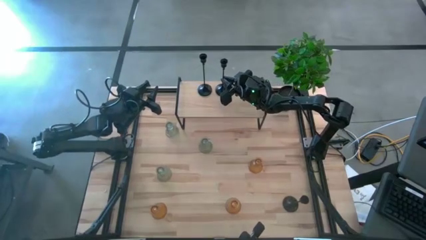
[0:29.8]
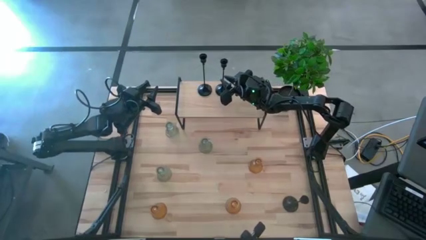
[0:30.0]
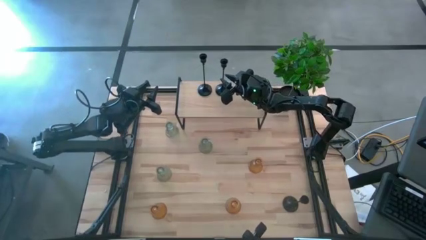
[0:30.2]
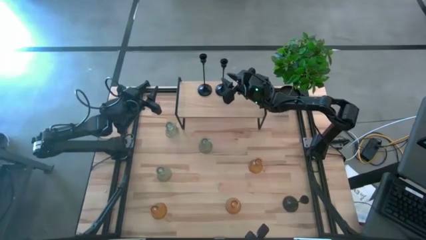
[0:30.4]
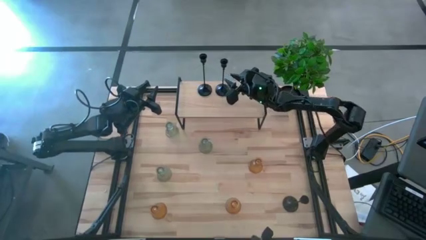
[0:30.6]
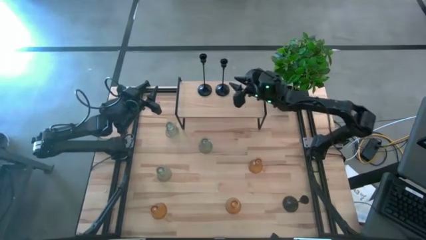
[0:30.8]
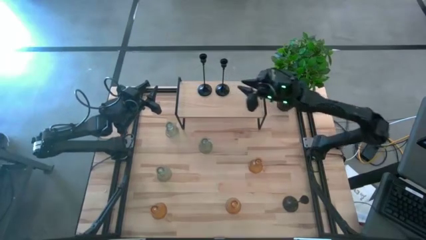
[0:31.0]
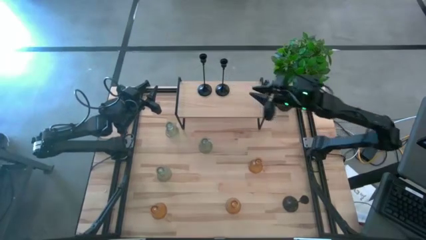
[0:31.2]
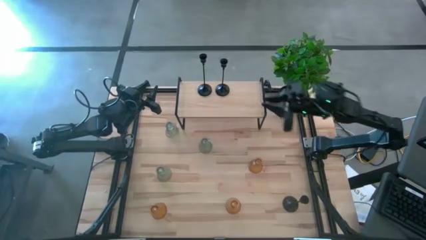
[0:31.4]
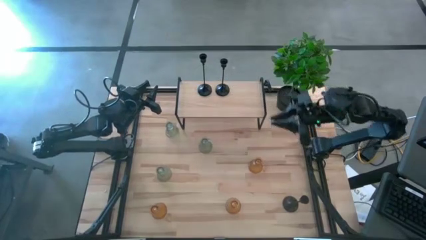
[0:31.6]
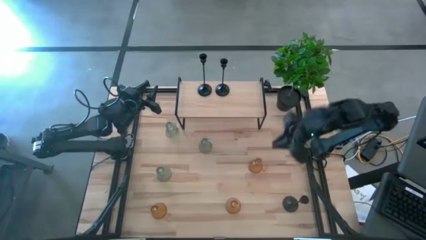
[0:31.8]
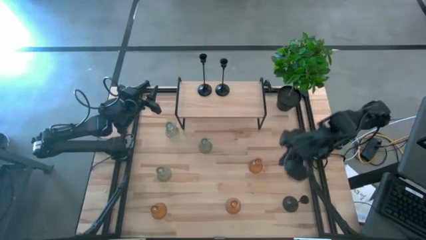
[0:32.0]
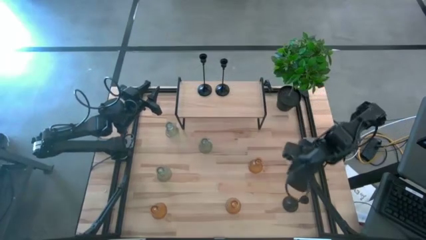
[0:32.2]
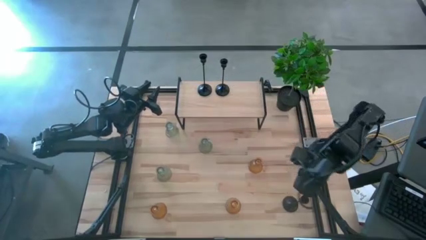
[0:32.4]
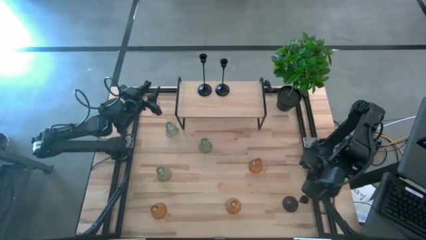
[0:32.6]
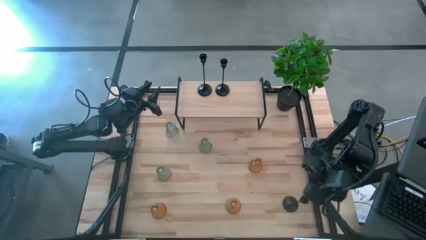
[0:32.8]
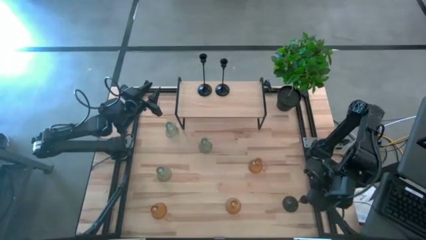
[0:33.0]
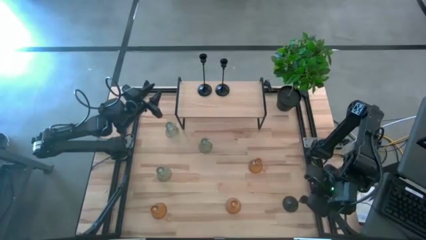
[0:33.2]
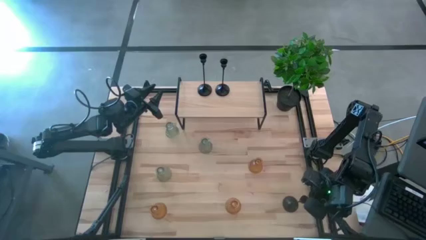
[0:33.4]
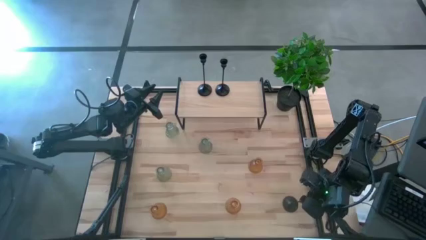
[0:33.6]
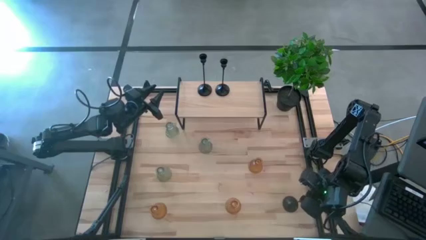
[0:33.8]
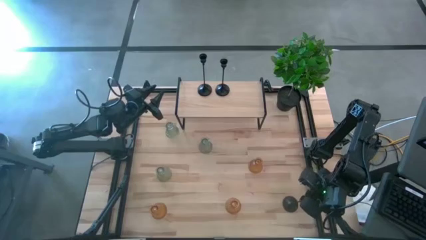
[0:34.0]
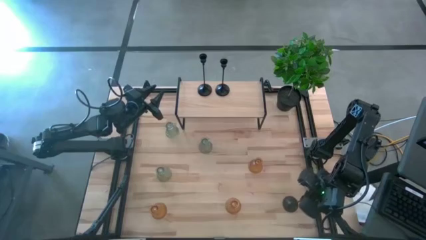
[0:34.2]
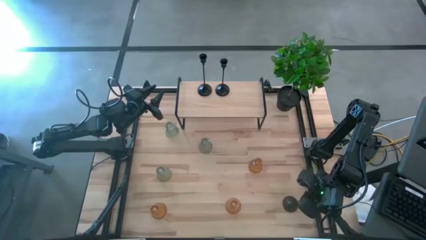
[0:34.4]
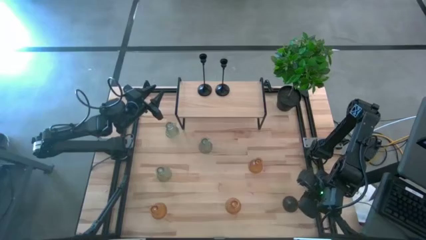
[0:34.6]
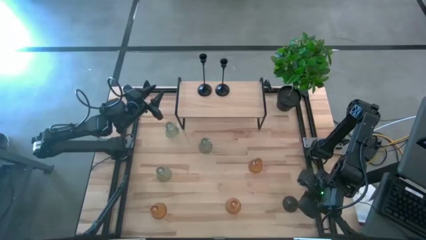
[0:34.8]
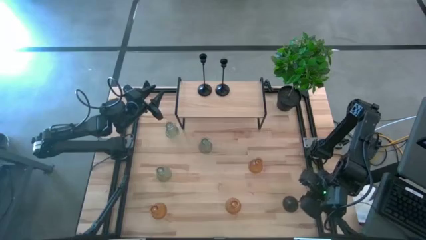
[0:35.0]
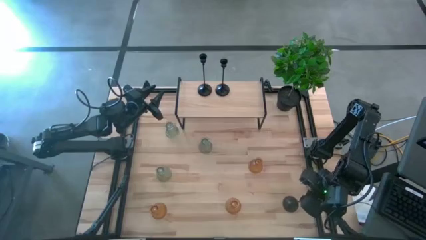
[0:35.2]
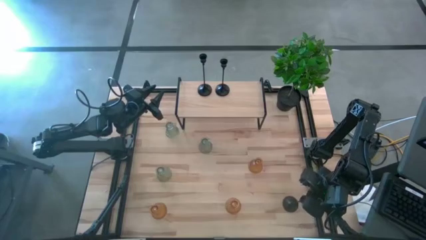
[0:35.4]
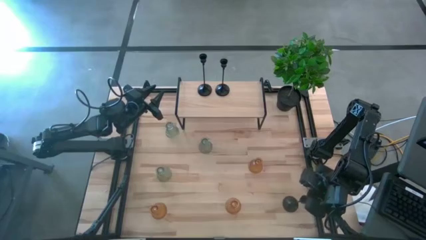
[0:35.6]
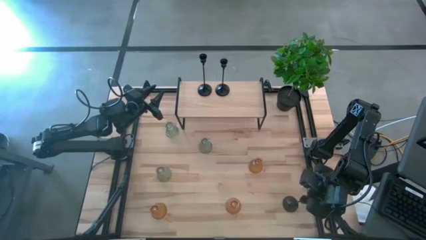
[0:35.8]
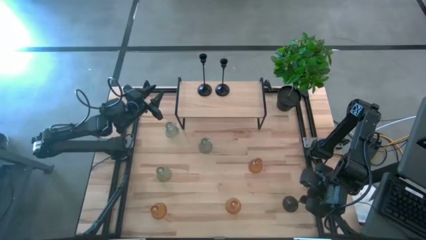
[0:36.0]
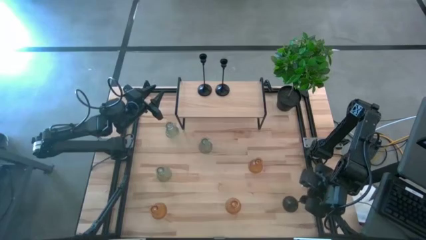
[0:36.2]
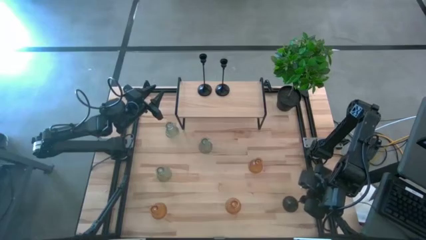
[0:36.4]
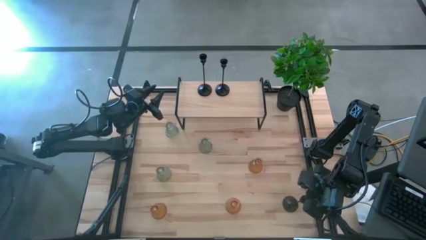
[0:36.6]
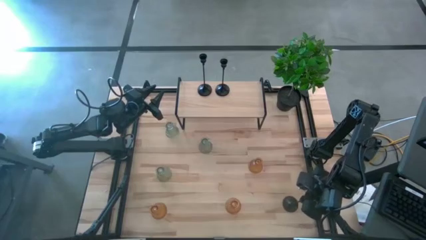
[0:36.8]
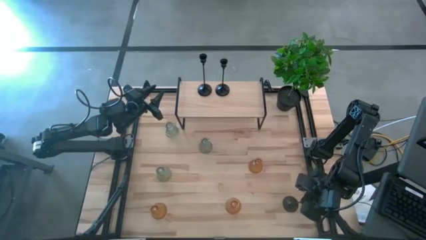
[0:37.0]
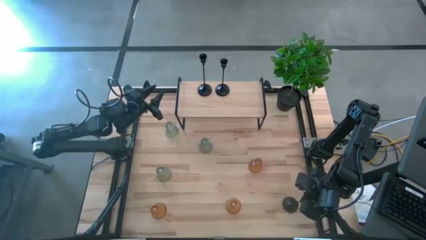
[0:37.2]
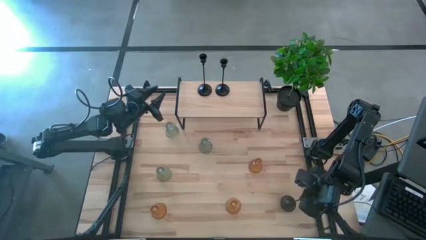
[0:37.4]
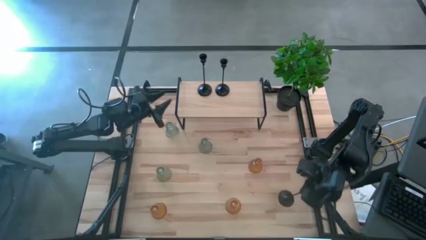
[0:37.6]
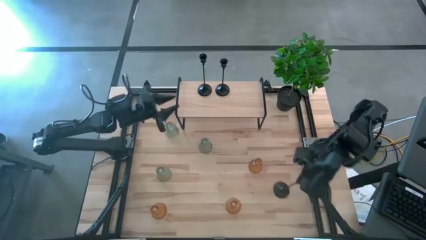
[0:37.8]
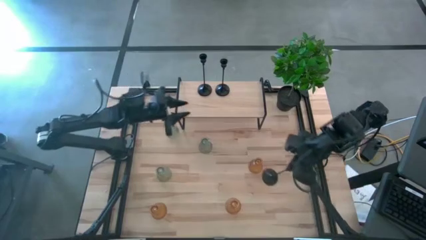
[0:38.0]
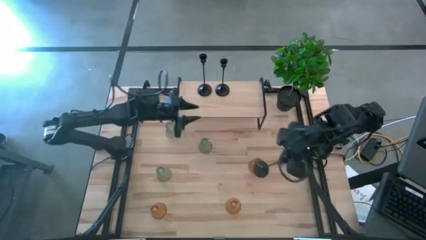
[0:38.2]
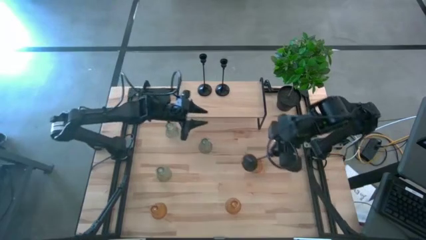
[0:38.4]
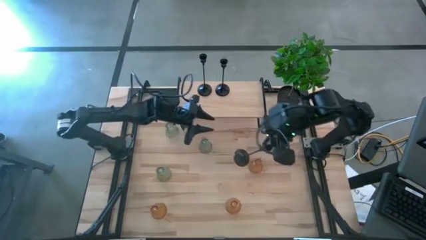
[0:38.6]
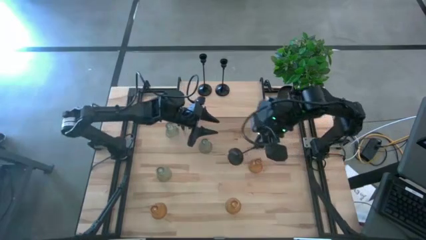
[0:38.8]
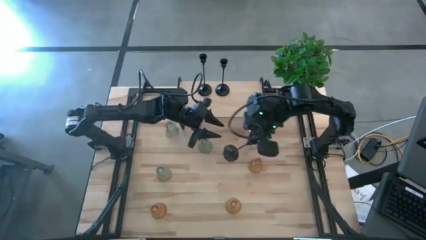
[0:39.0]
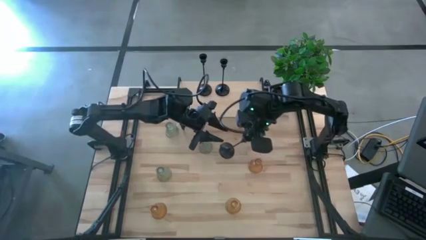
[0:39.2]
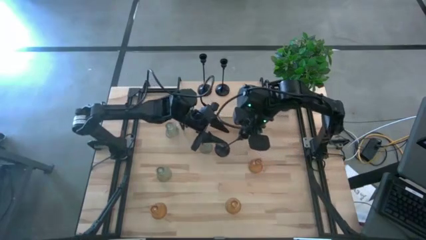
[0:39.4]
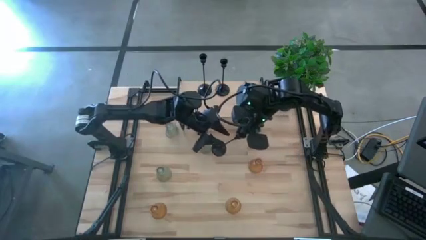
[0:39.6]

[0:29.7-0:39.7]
Task: Pick & Place candle stick holders
Put the black candle holder on the shelf

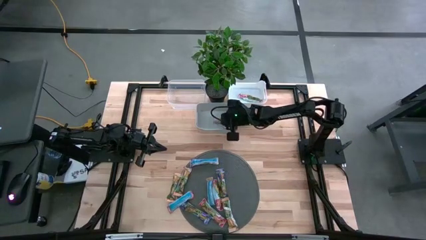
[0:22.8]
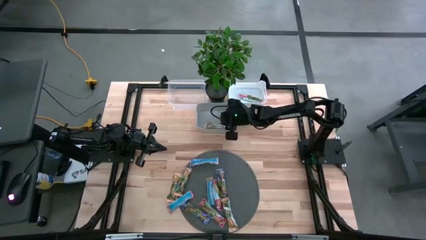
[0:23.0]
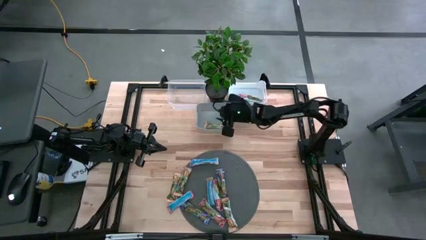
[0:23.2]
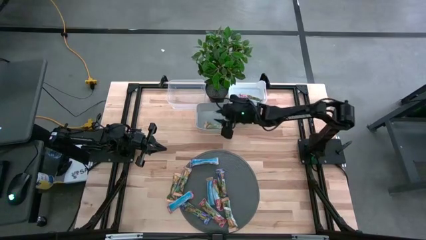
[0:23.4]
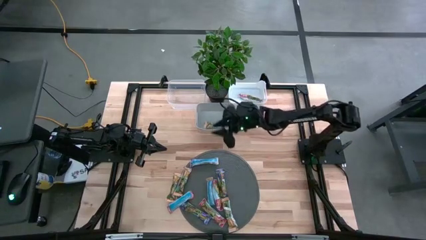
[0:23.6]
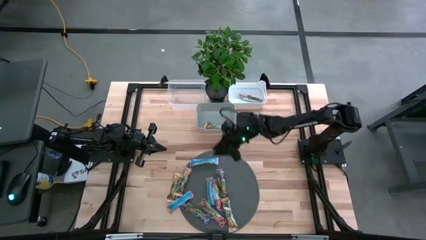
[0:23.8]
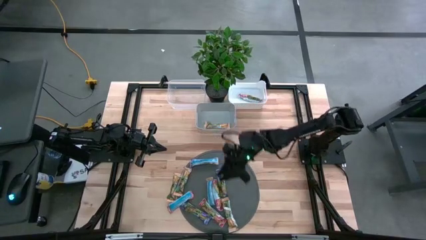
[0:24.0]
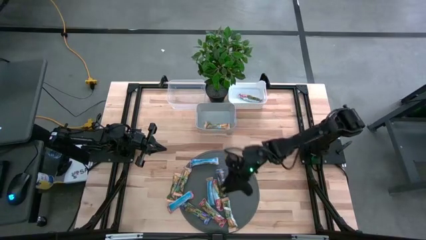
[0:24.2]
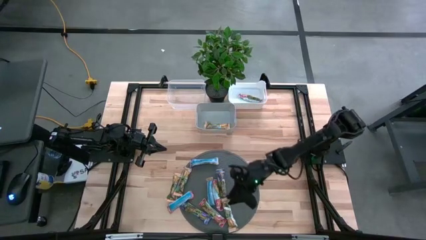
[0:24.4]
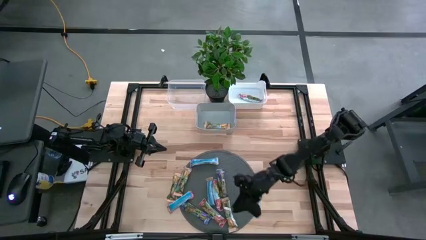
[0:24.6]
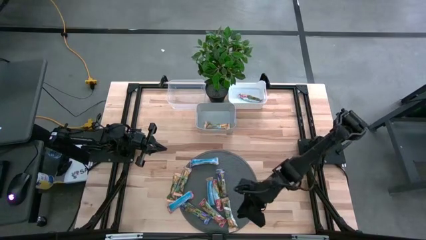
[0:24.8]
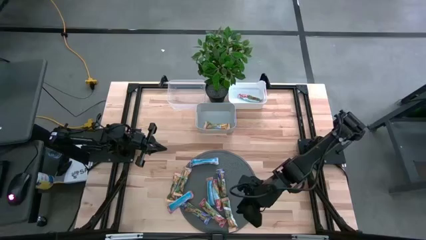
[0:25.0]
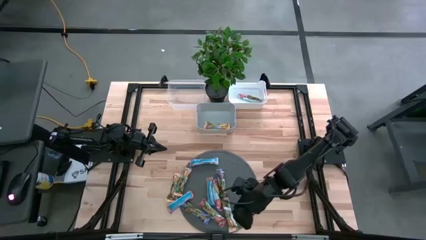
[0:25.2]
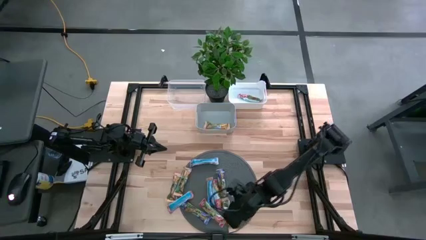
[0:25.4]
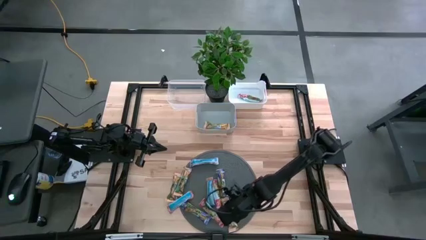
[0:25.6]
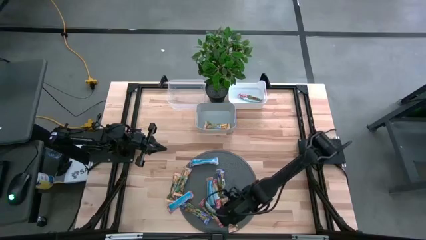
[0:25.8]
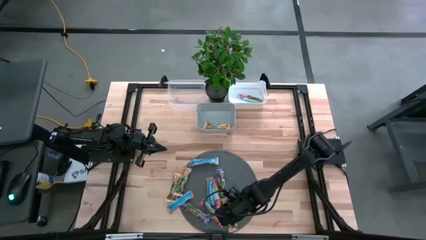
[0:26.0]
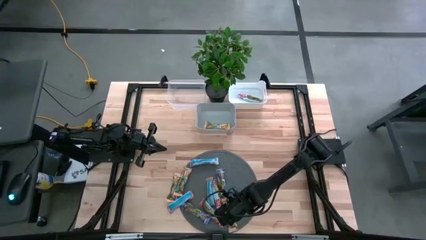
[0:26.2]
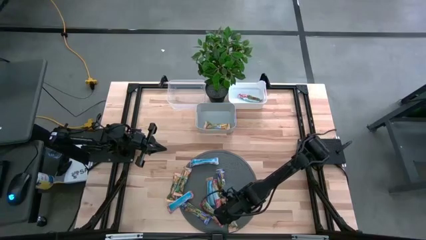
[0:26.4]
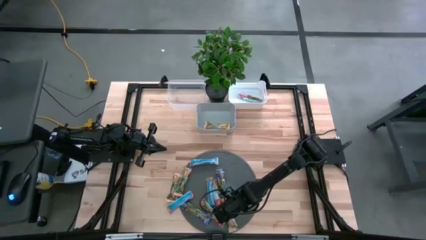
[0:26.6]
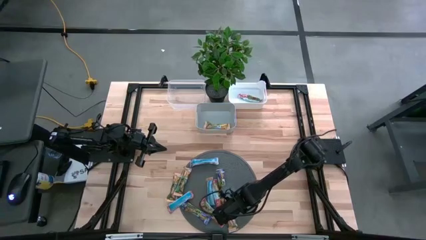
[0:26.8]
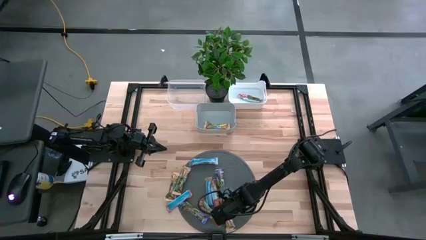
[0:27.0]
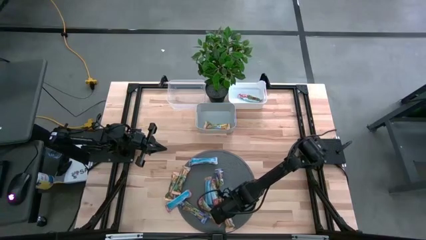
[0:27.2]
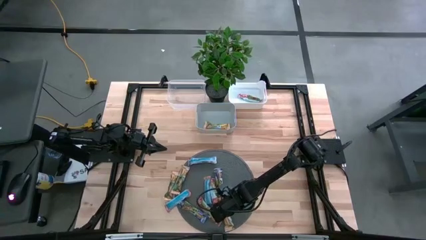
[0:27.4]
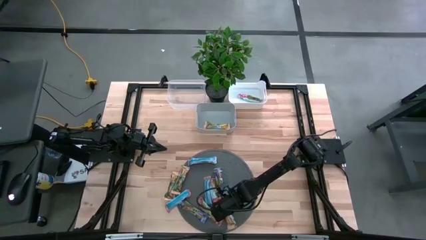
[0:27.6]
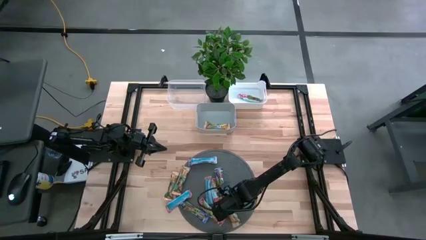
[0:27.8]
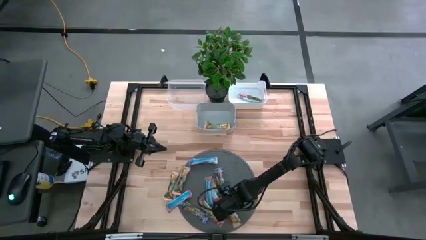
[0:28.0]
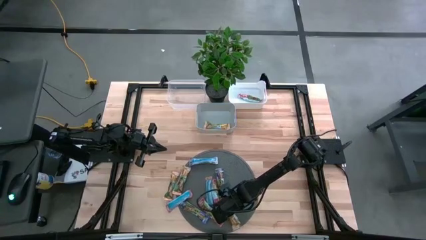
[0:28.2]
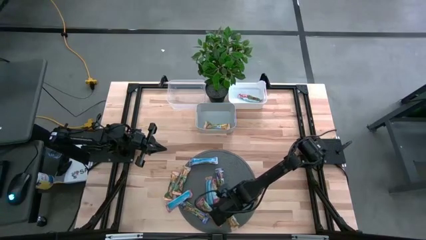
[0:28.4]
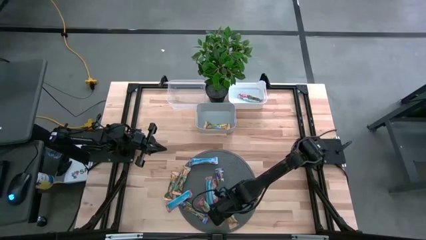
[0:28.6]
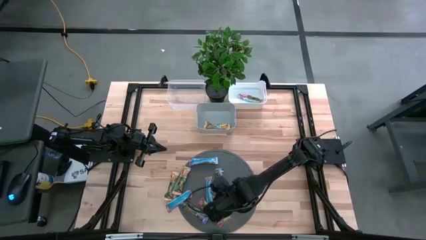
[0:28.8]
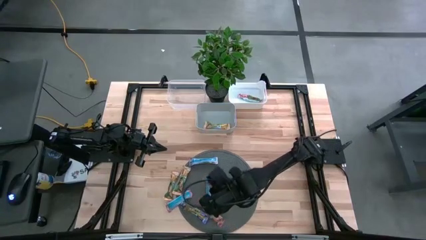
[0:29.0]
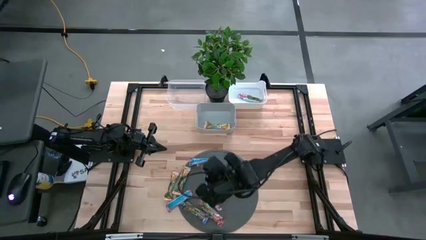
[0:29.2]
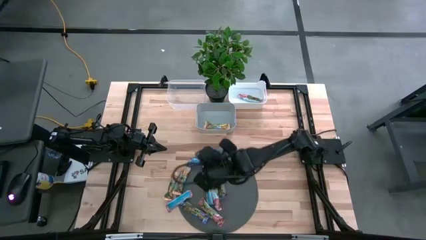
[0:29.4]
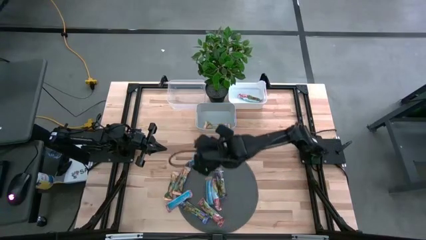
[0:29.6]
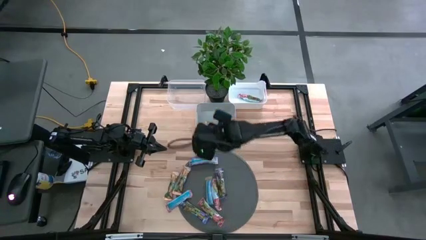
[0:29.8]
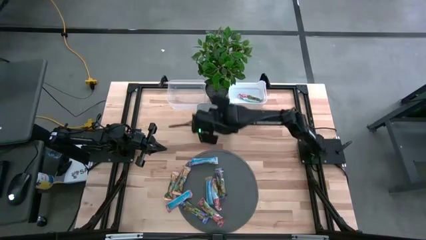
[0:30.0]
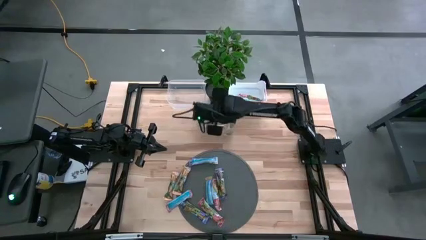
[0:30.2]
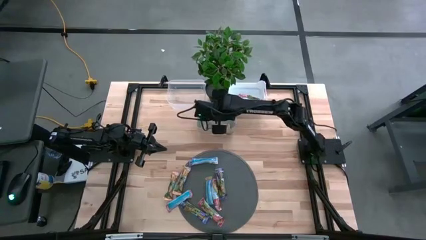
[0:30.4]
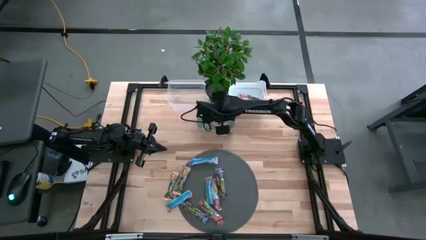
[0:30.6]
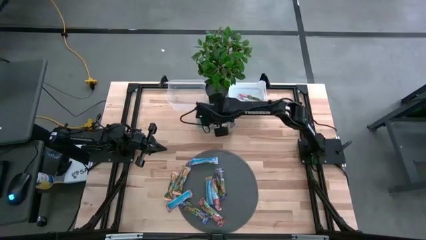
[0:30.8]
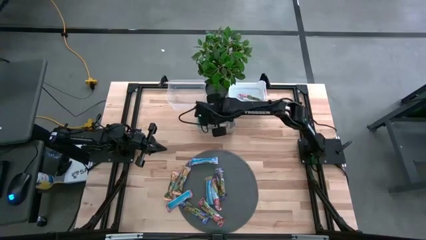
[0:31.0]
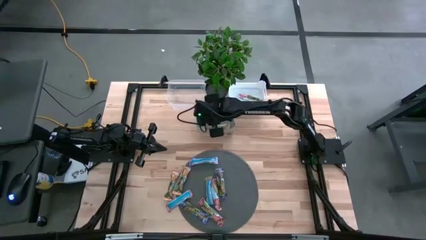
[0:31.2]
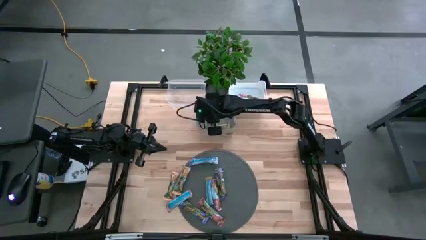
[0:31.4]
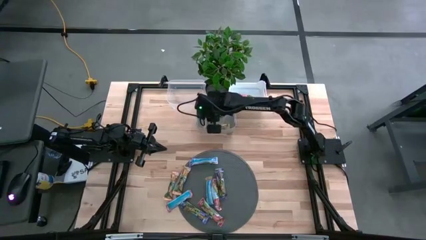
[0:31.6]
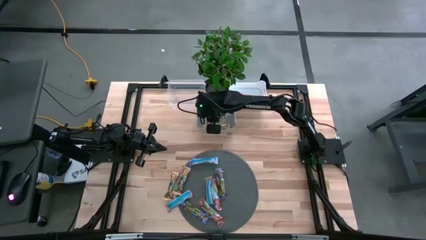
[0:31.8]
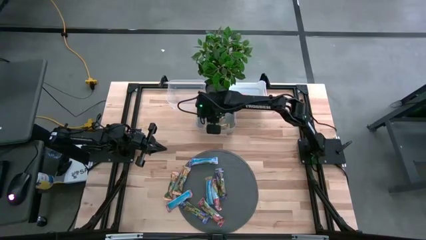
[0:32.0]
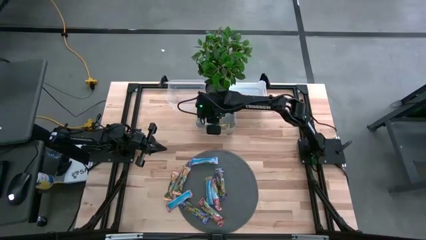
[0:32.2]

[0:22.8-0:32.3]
Task: Pick and place Granola Bars by type
Put the orange granola bar into the gray bin
